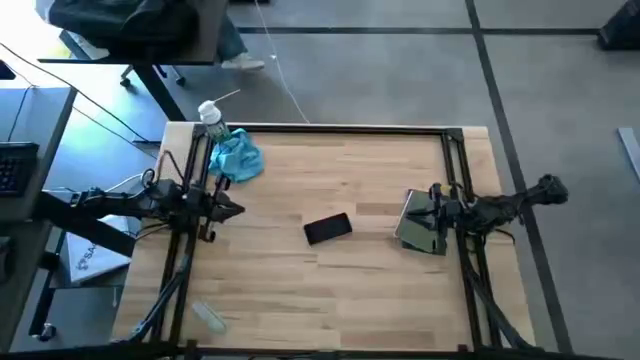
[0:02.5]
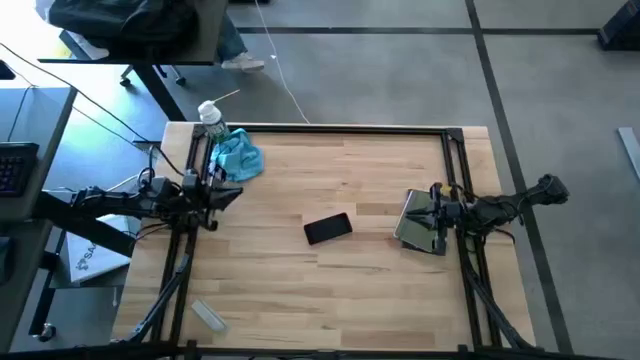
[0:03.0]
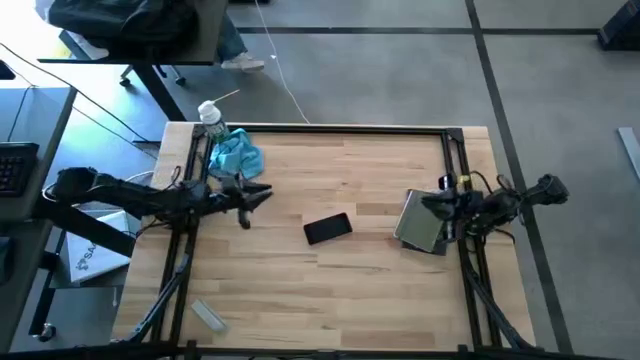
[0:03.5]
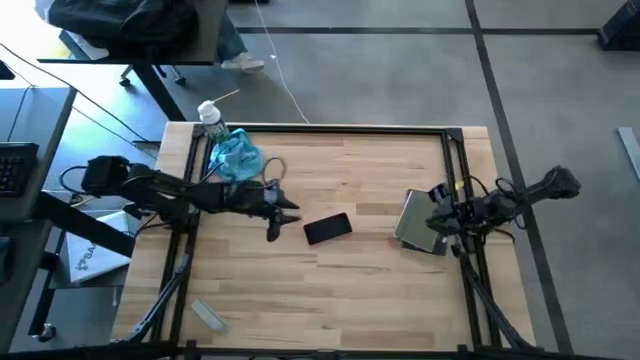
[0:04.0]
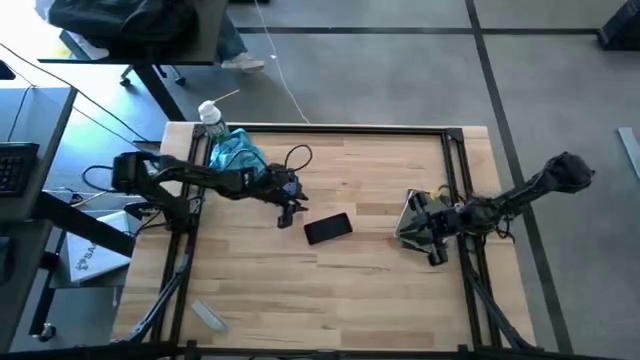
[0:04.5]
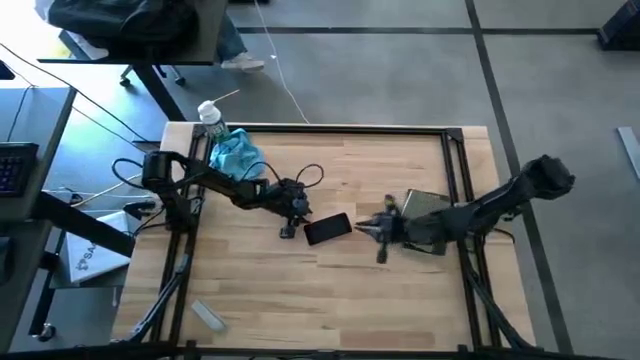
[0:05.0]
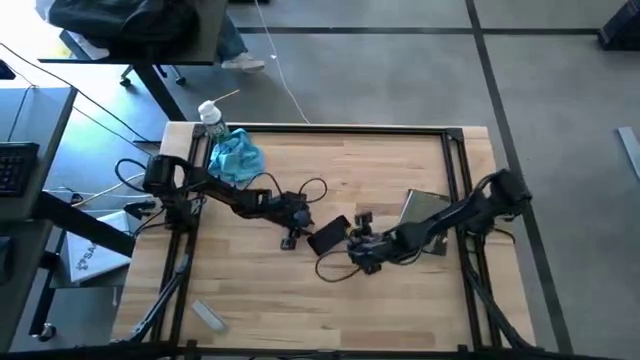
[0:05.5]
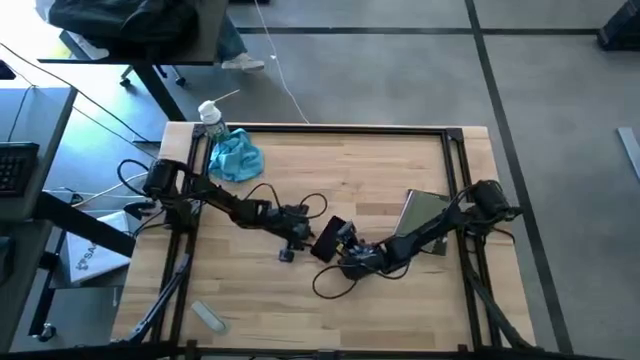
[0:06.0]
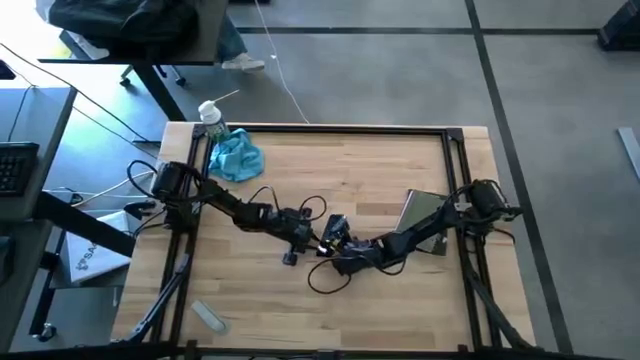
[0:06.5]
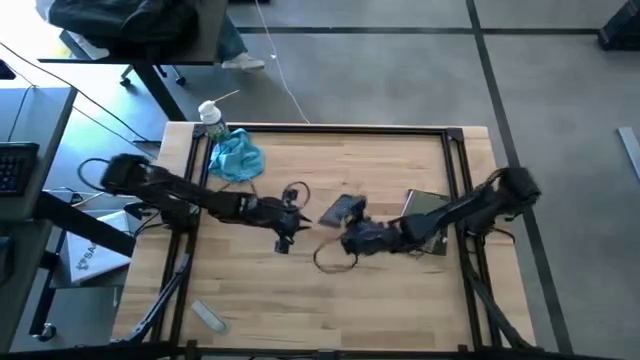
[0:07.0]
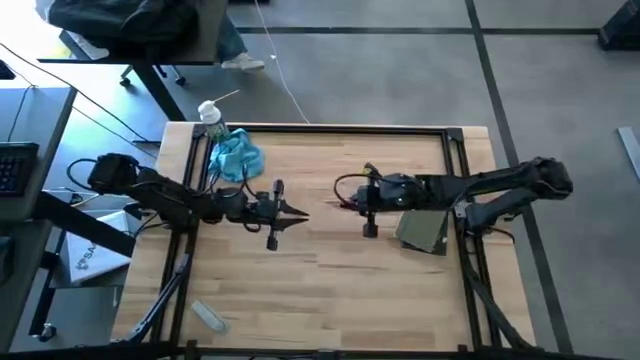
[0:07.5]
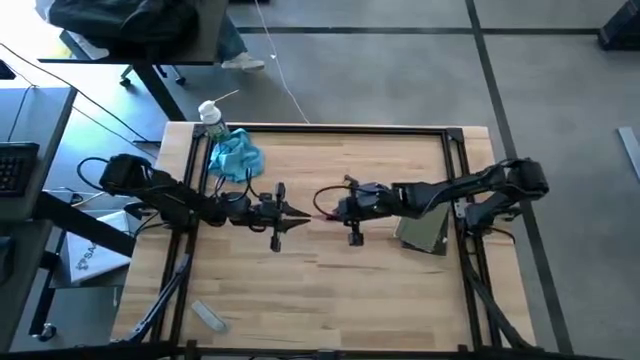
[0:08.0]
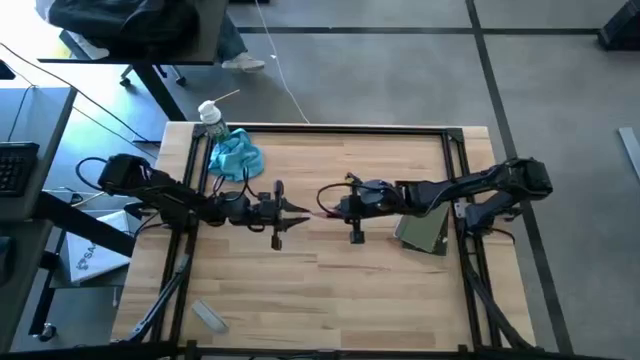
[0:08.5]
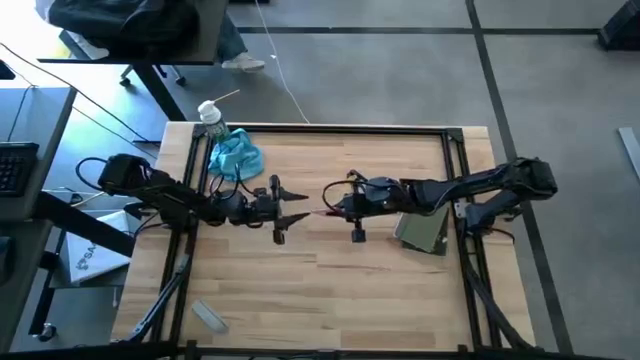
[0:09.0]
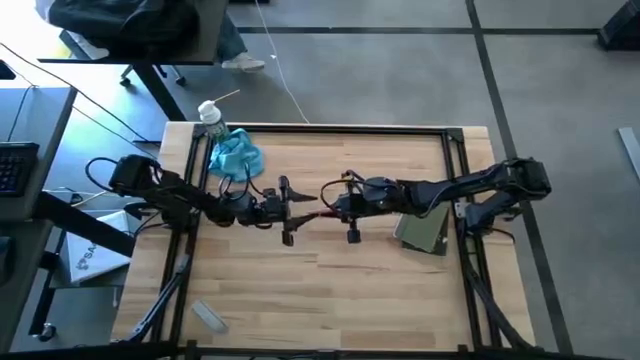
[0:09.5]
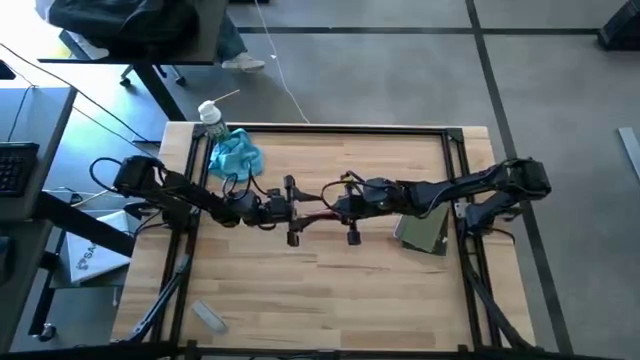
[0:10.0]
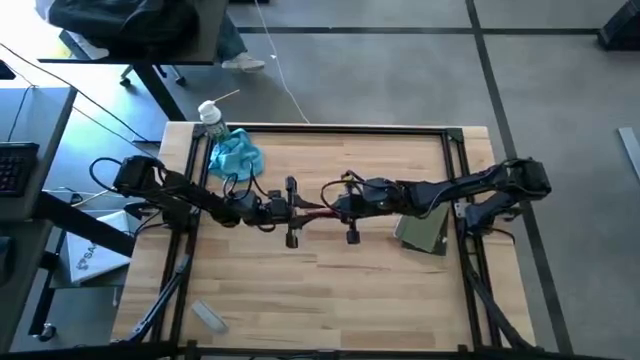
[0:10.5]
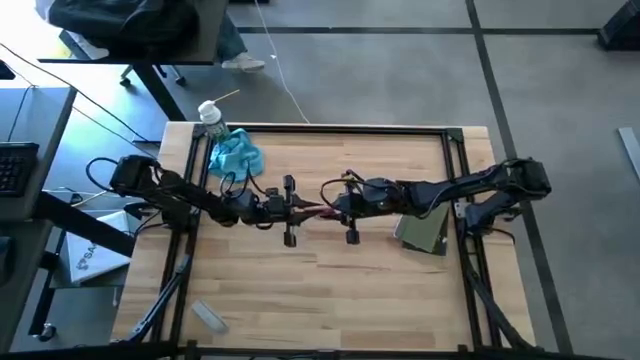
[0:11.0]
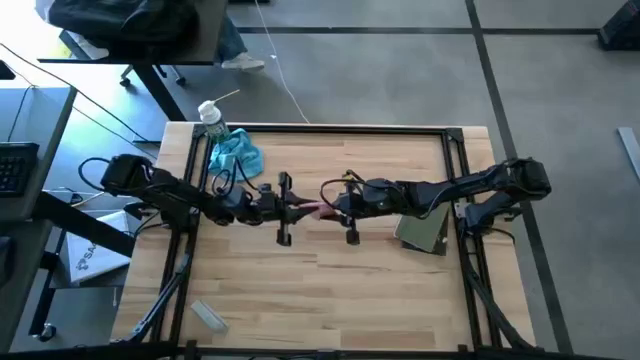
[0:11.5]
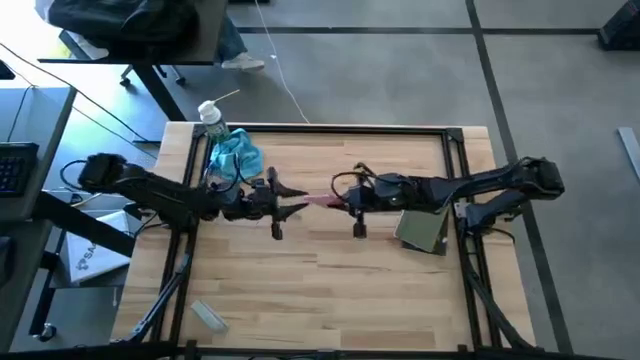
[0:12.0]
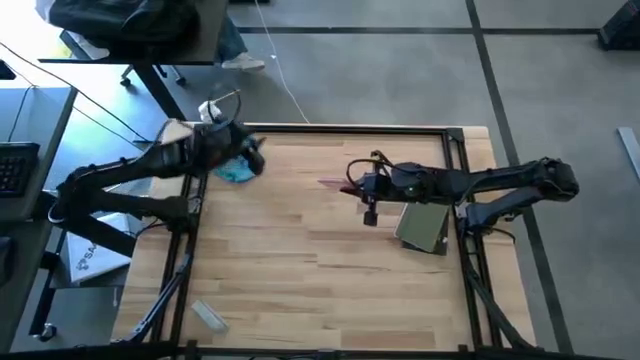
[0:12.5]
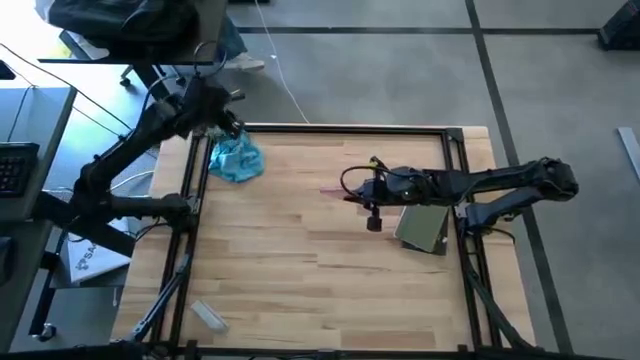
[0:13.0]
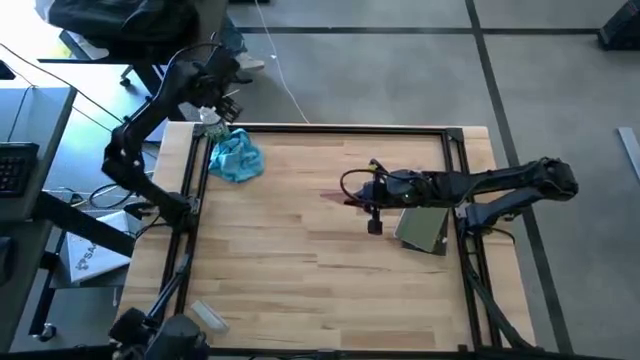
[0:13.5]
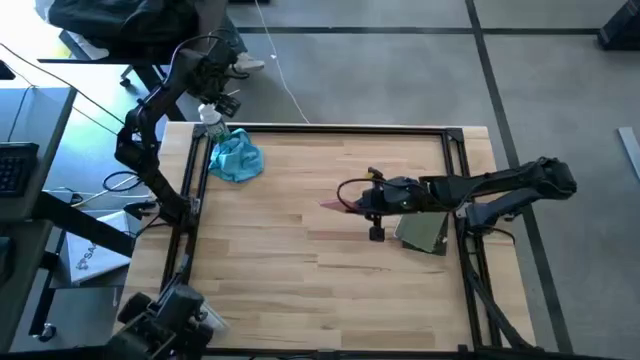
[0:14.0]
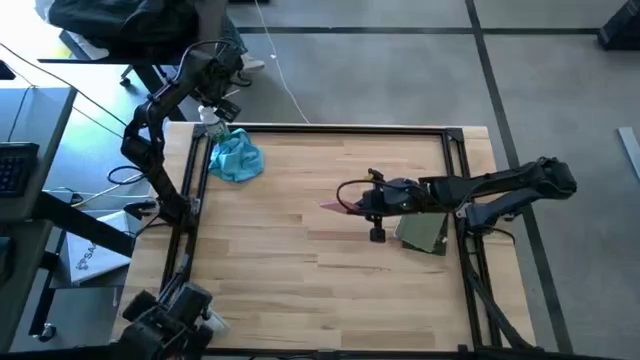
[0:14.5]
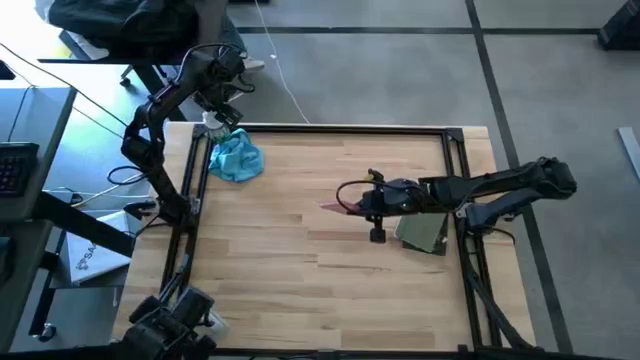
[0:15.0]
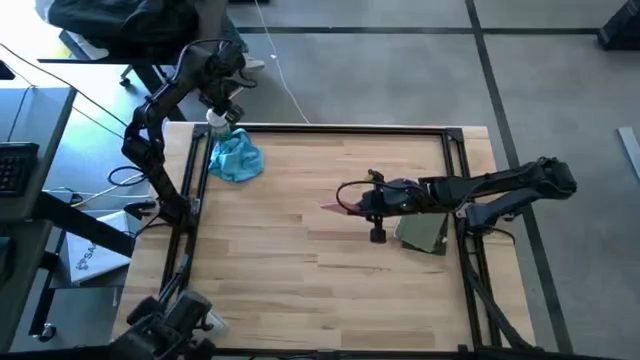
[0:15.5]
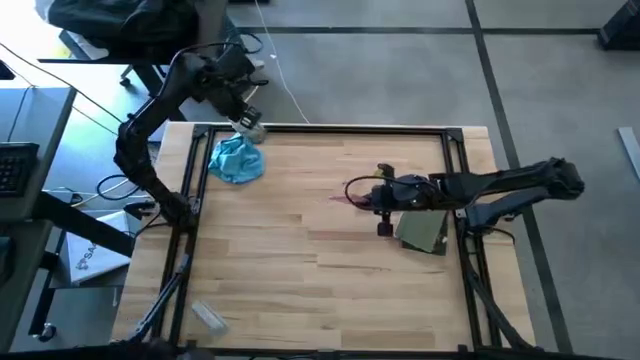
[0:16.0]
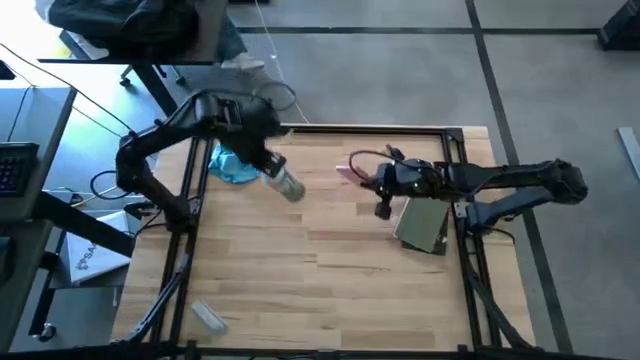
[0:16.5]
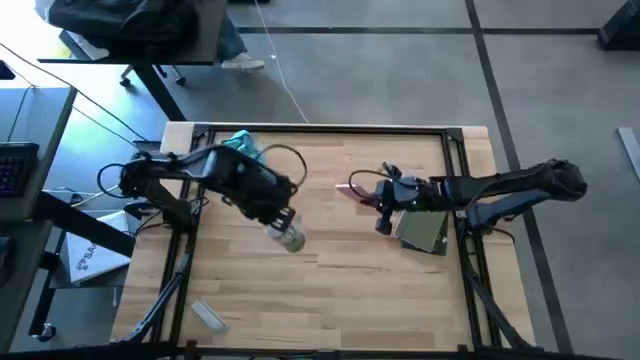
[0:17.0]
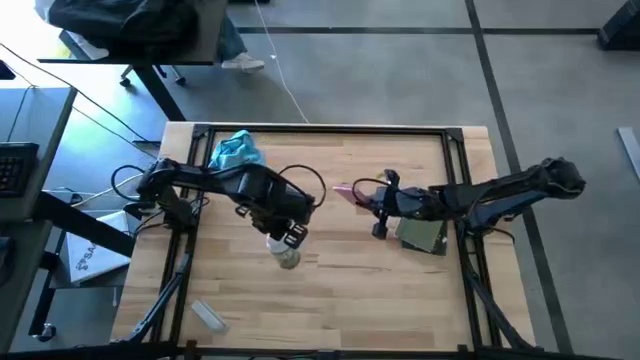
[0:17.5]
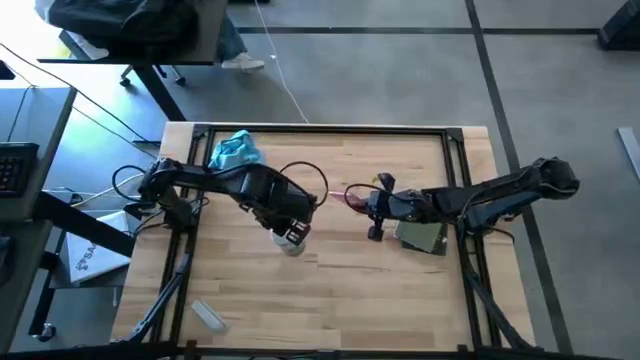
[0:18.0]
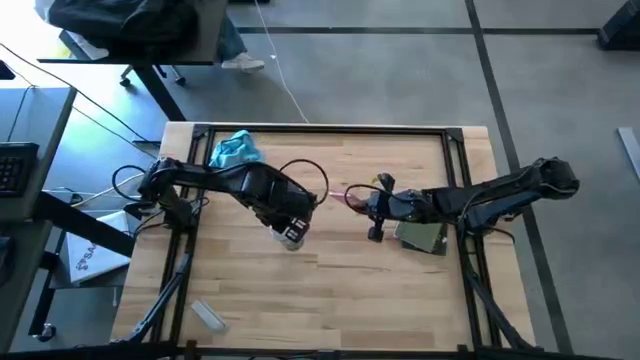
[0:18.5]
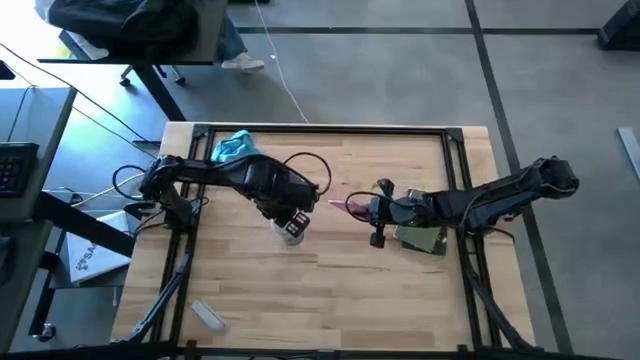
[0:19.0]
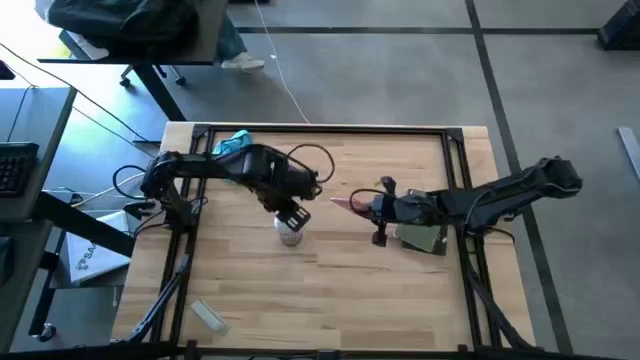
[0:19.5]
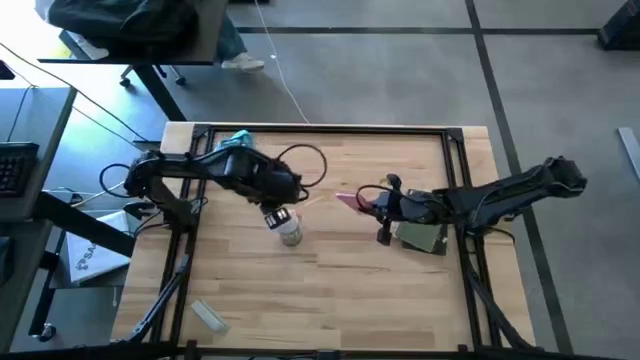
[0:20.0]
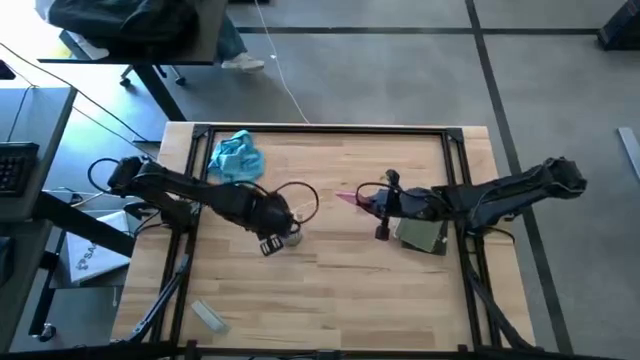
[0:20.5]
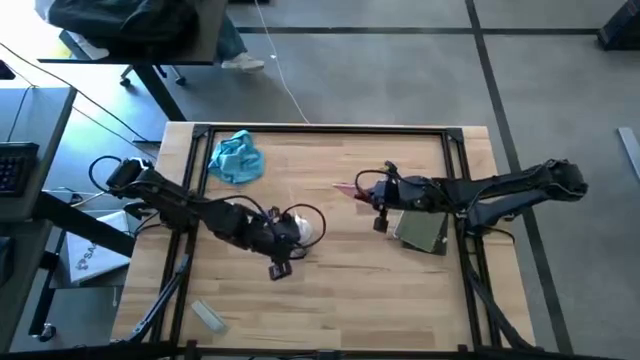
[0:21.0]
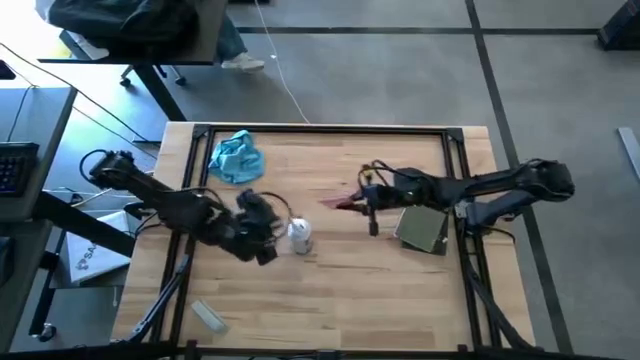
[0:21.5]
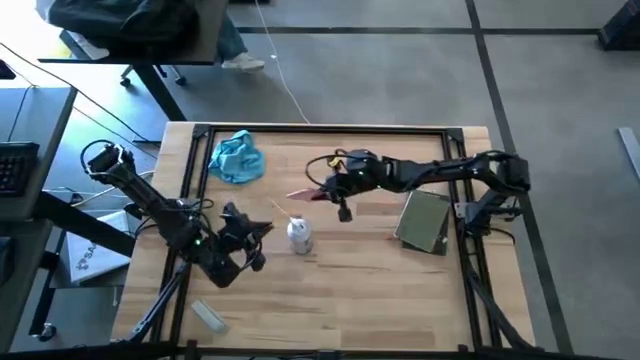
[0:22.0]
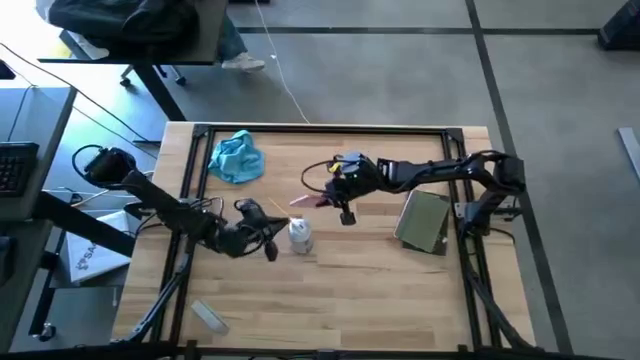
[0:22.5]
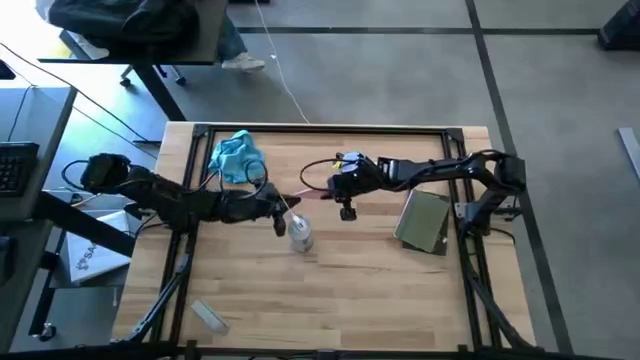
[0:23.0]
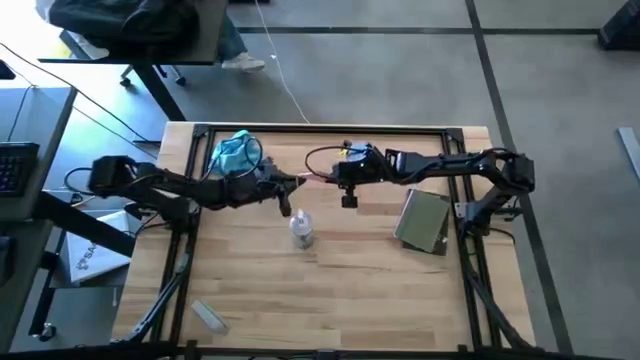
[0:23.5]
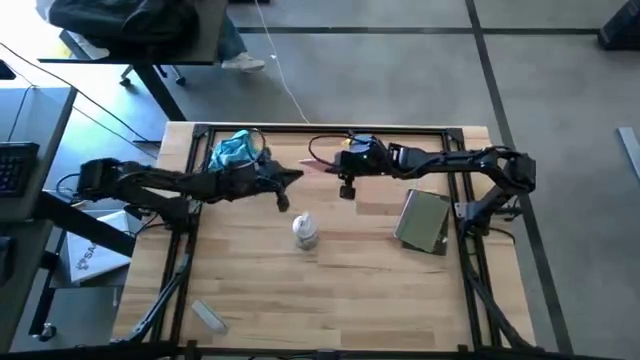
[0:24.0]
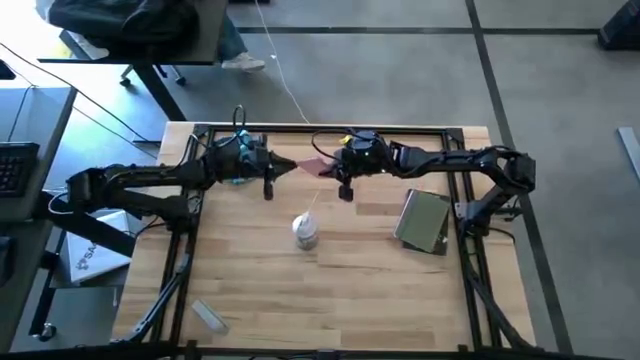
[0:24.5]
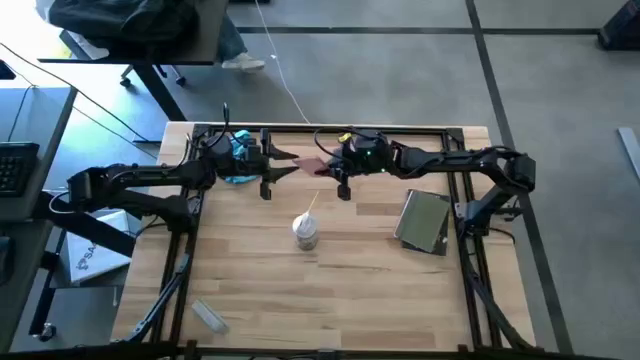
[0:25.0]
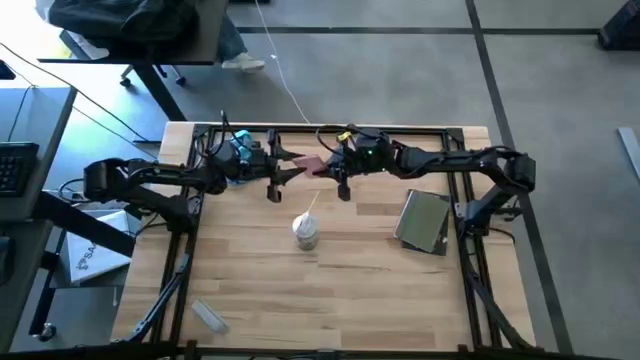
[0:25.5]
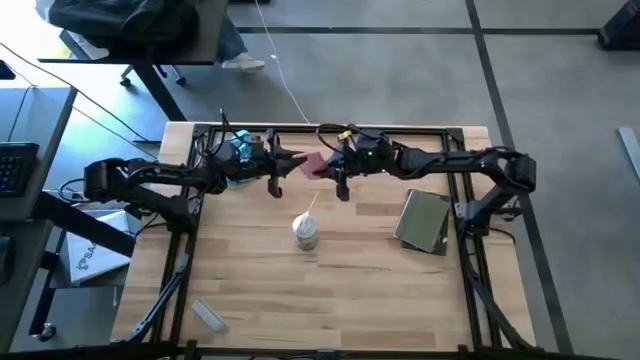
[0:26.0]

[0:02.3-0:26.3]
Task: Apply microfiber cloth
Spray the back and front of the pink cellphone using the blue spray bottle
